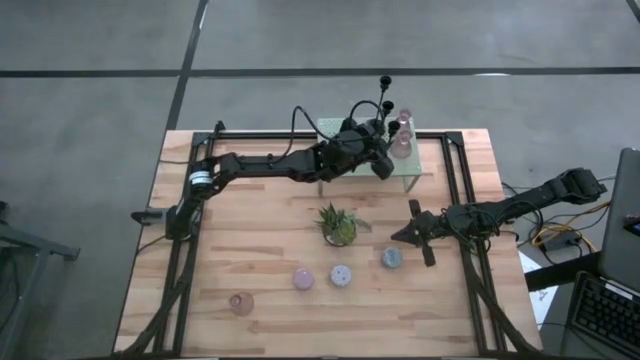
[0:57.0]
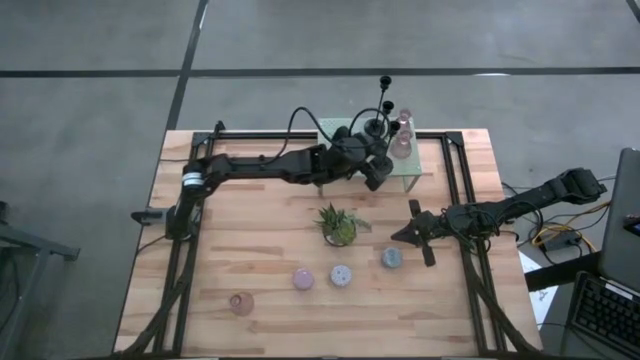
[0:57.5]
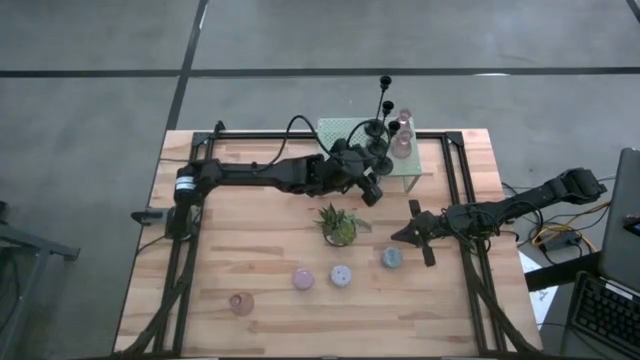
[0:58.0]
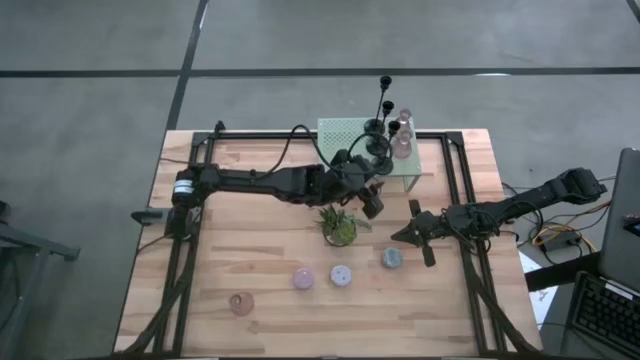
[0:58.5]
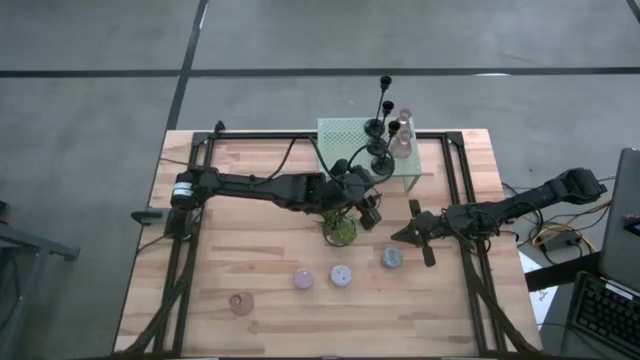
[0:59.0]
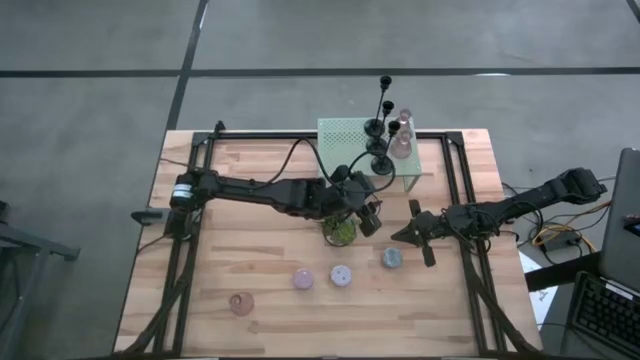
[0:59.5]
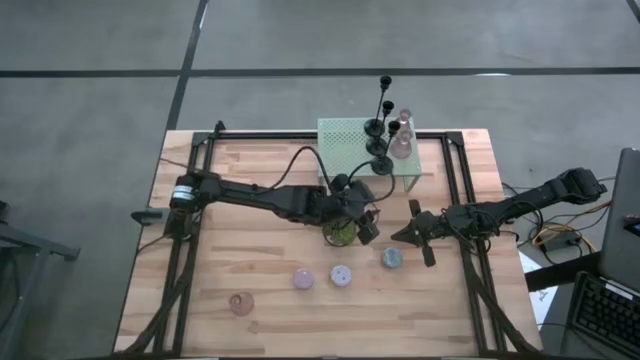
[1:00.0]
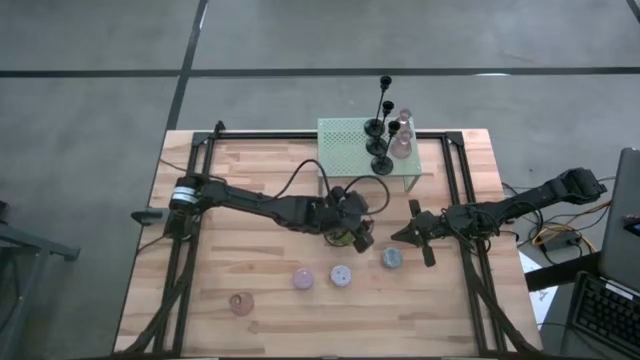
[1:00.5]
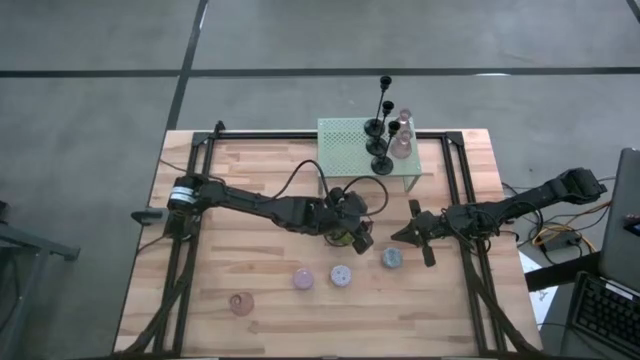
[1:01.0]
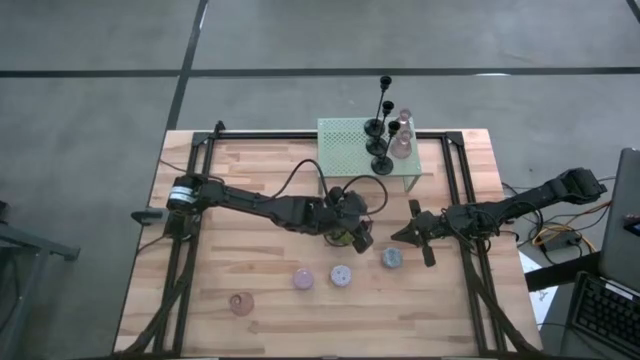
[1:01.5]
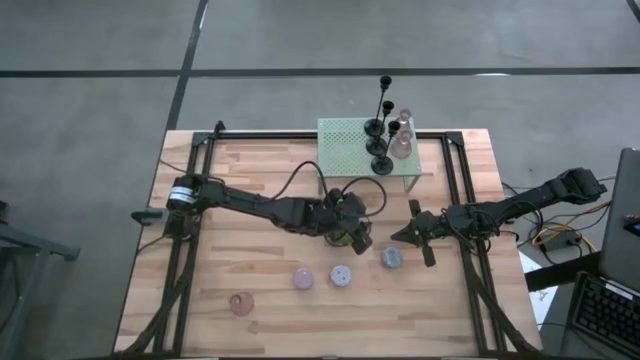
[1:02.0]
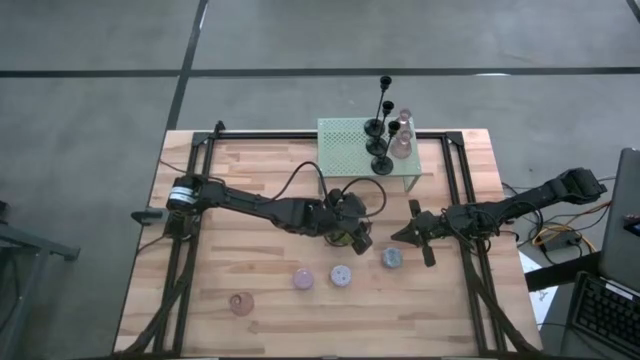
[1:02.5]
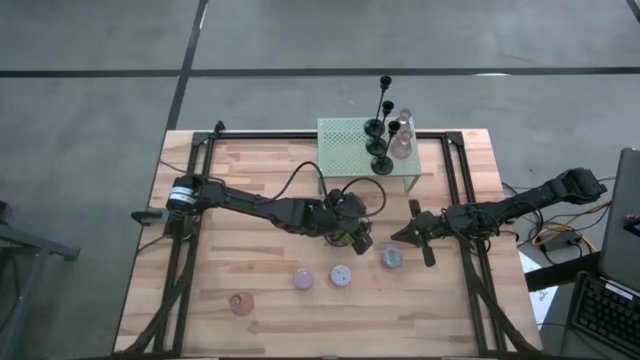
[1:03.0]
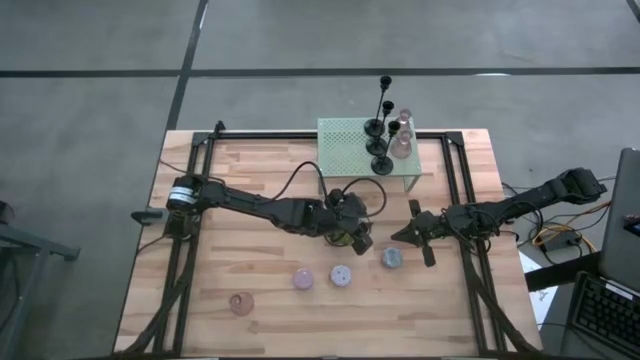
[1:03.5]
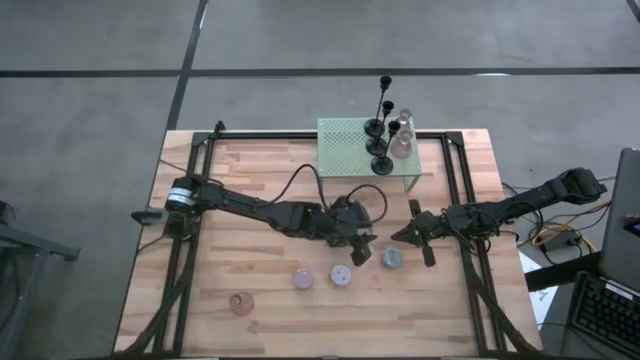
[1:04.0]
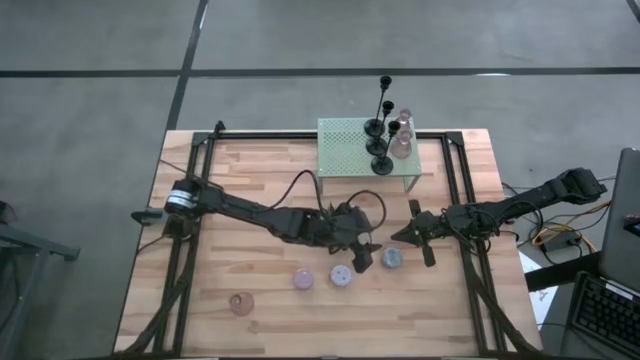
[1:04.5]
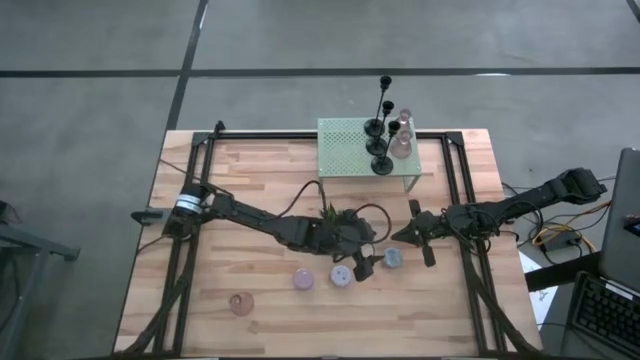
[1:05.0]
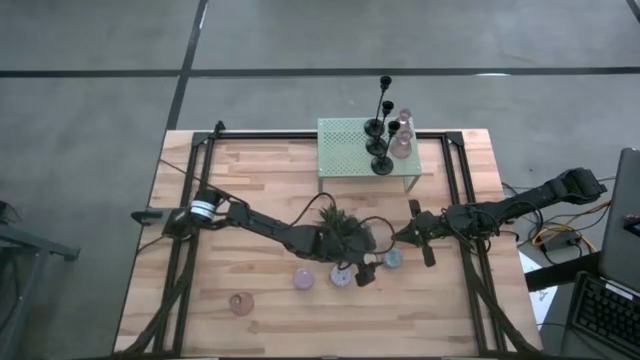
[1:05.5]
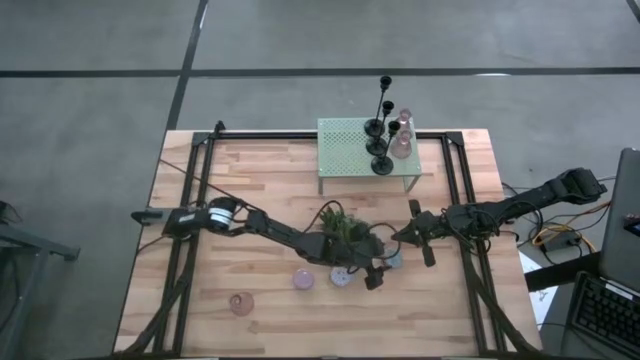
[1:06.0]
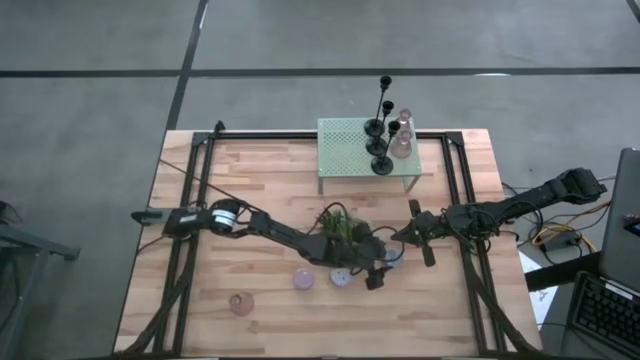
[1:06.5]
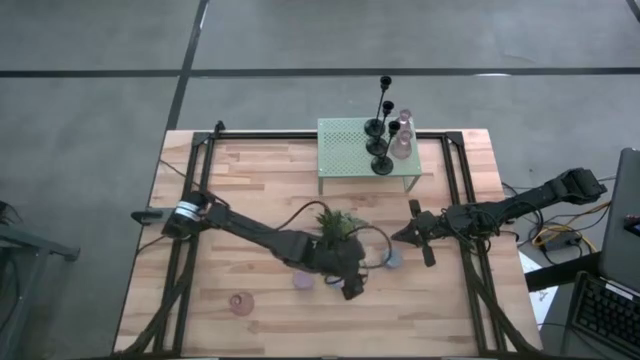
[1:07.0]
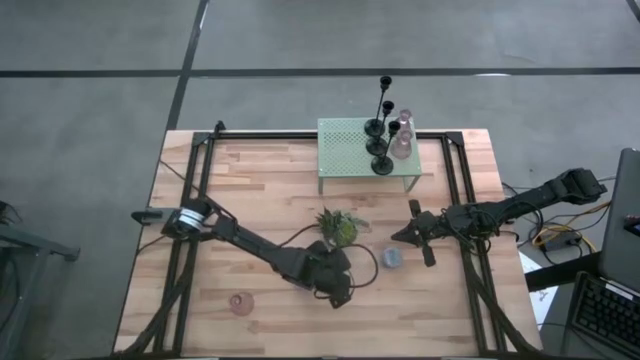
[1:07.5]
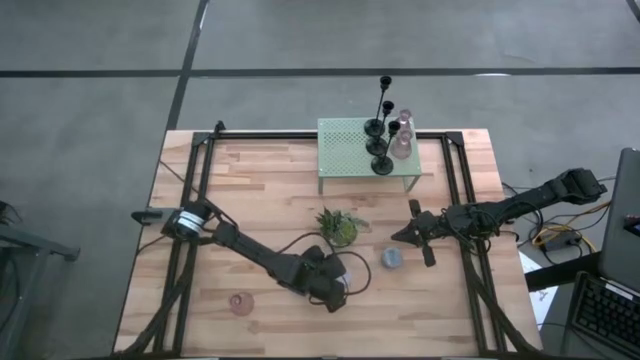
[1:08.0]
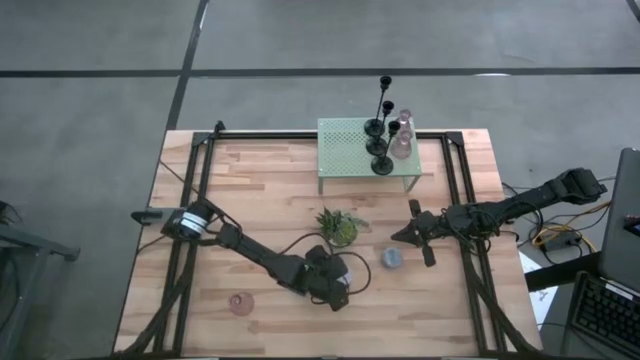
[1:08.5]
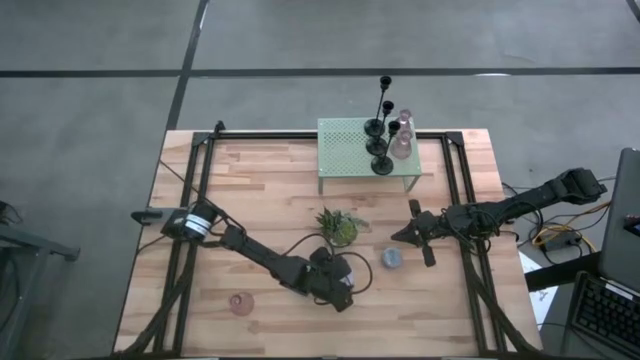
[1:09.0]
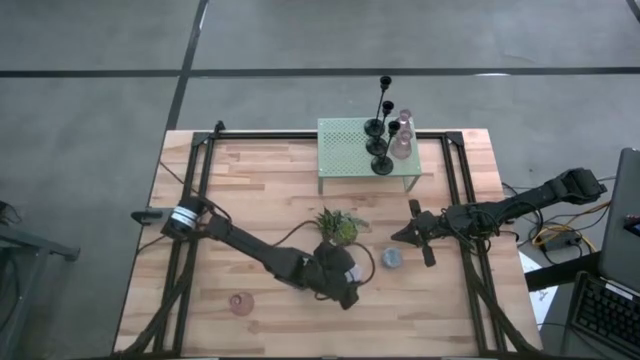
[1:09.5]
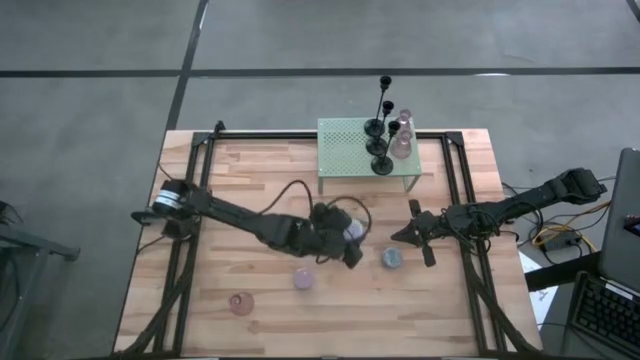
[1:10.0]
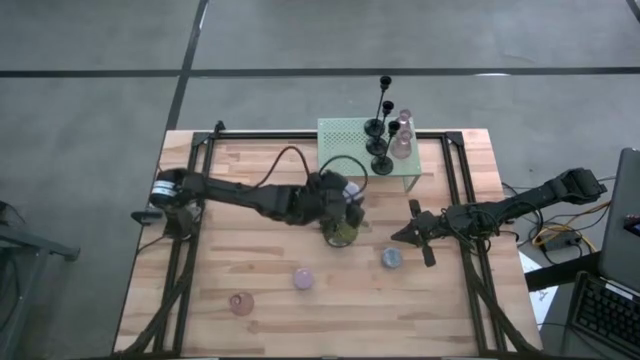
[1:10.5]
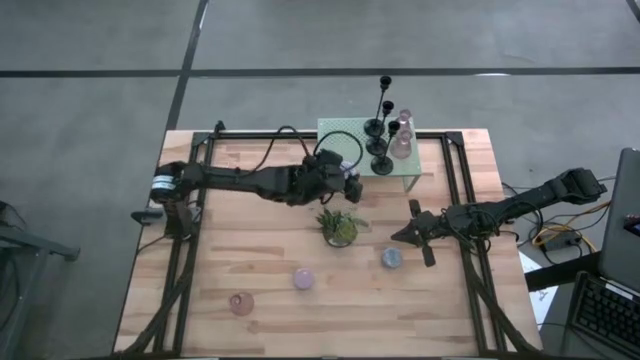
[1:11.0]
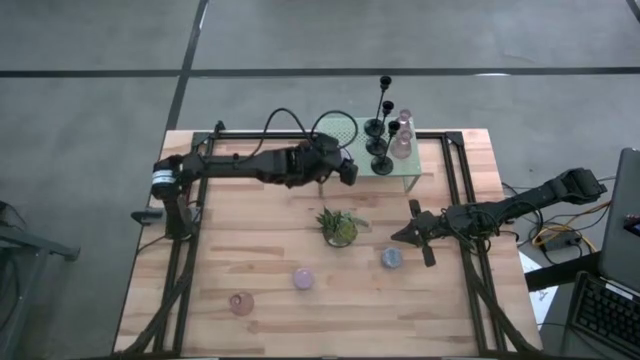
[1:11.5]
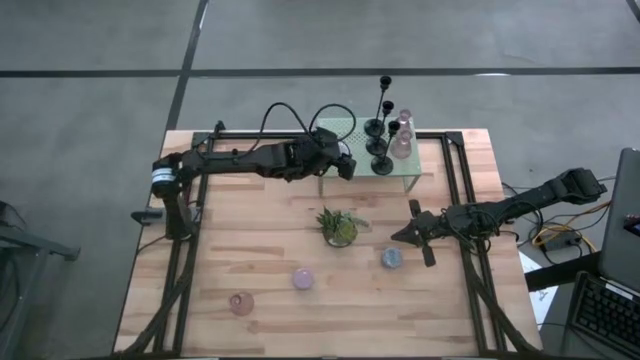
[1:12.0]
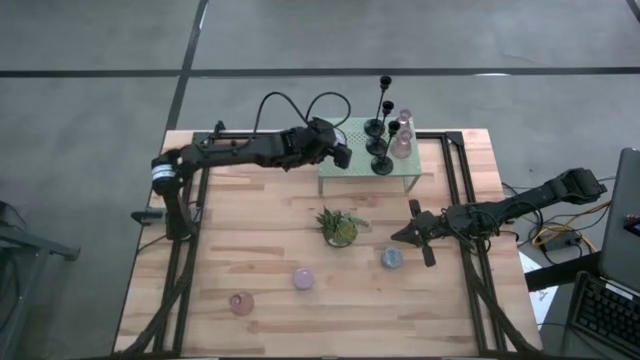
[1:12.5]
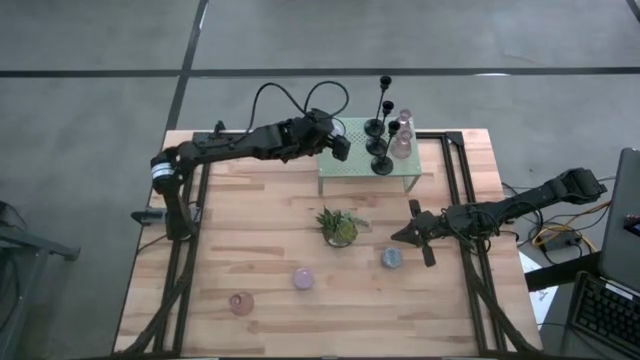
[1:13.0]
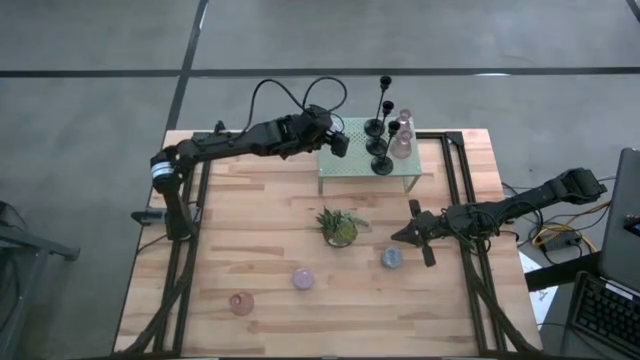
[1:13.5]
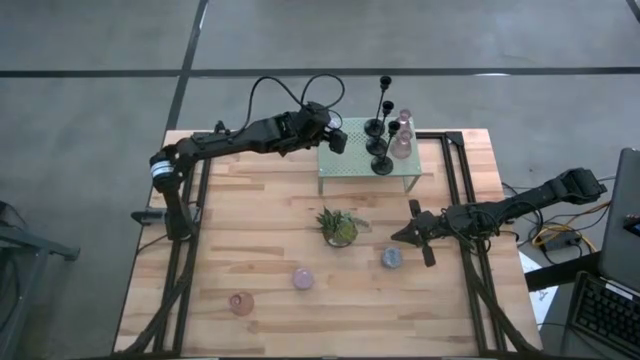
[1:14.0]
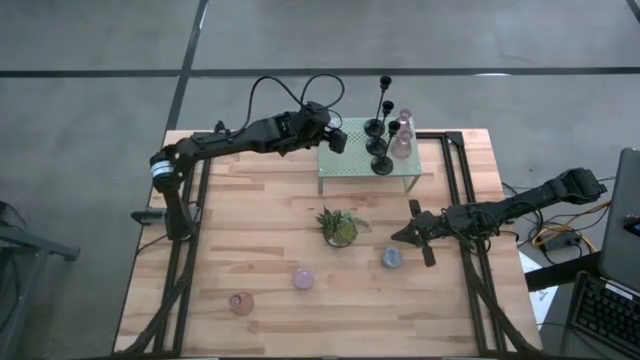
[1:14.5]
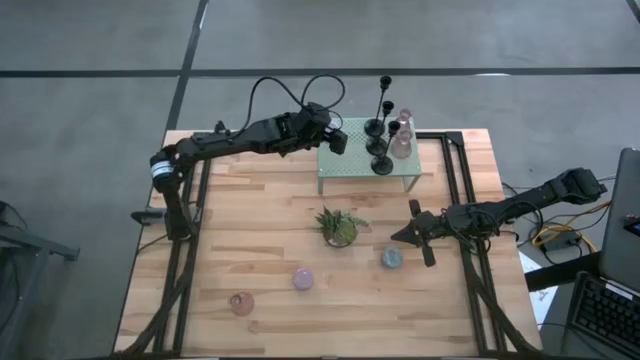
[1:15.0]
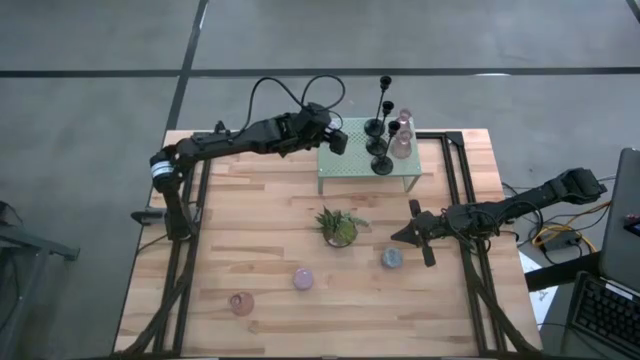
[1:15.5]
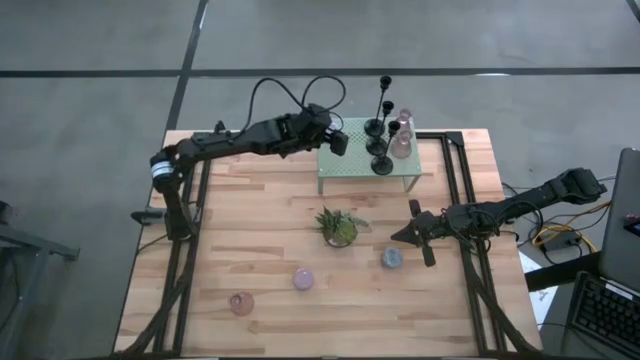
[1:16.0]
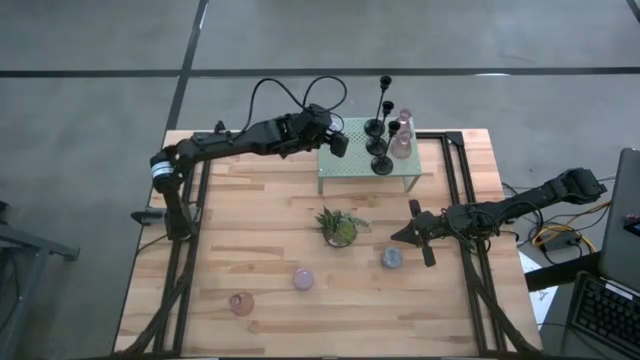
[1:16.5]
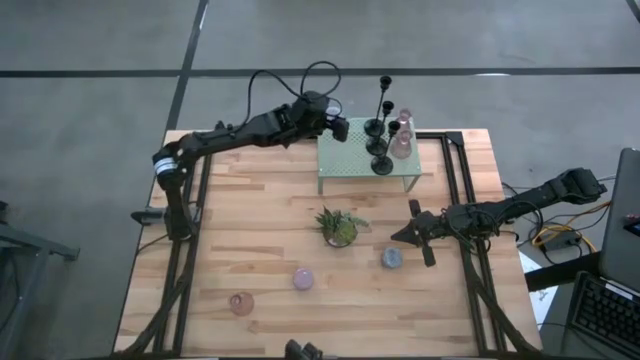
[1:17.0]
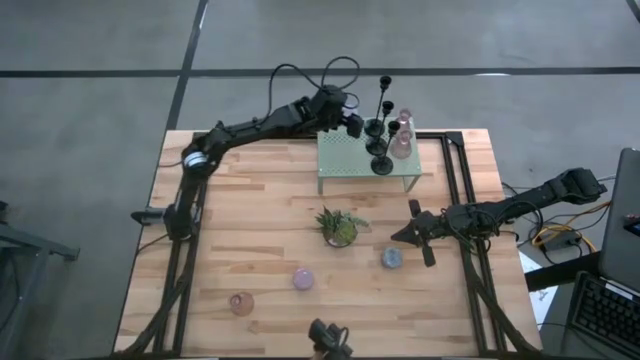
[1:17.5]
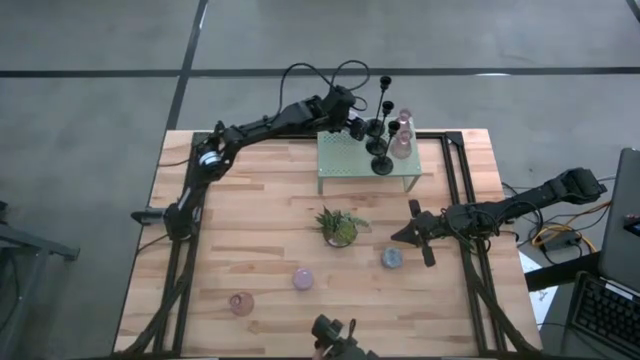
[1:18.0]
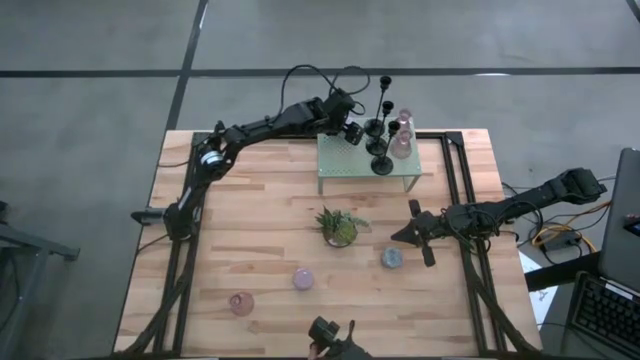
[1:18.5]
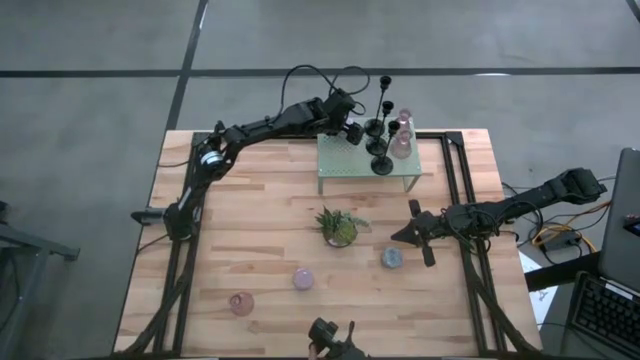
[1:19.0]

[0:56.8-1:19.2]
Task: Pick & Place candle stick holders
Put the middle white scented candle on the shelf
